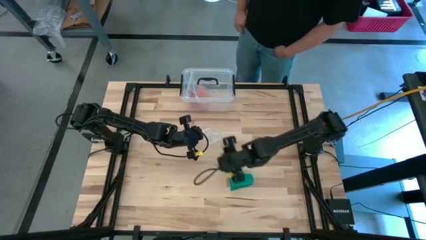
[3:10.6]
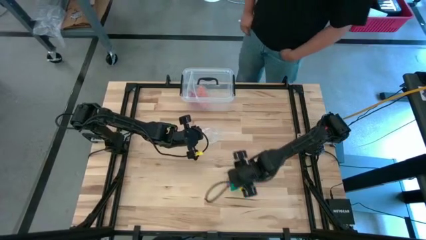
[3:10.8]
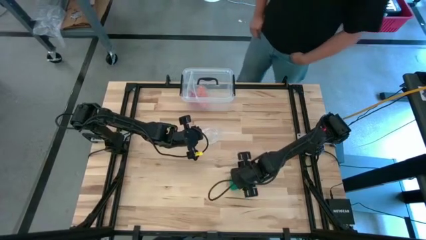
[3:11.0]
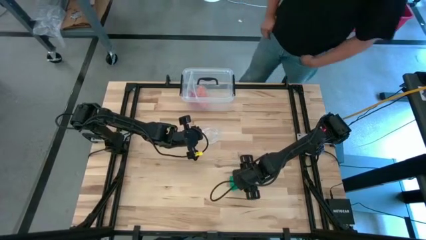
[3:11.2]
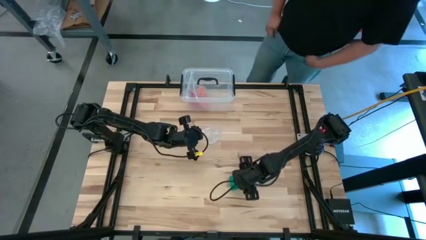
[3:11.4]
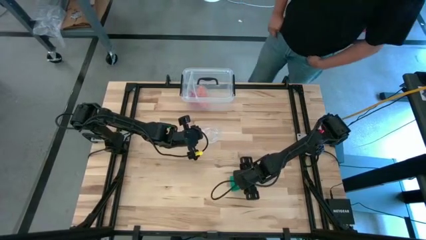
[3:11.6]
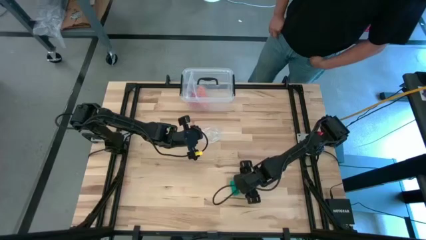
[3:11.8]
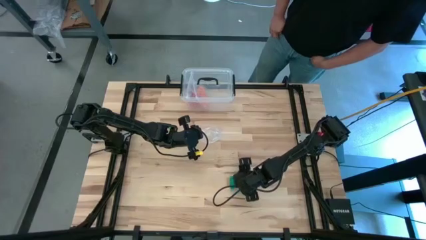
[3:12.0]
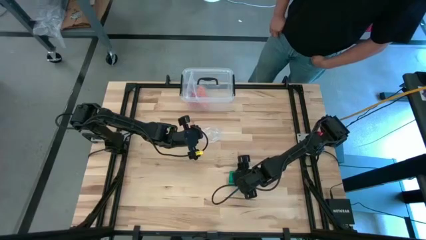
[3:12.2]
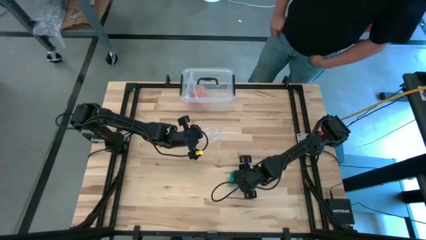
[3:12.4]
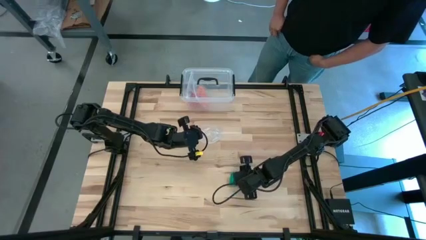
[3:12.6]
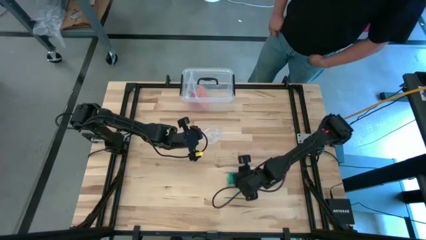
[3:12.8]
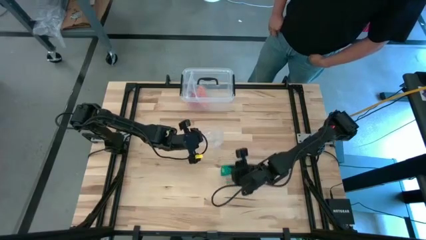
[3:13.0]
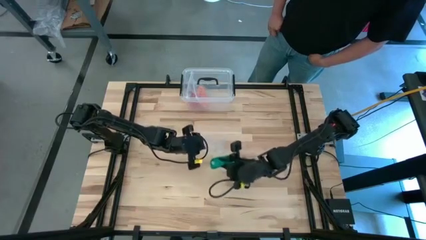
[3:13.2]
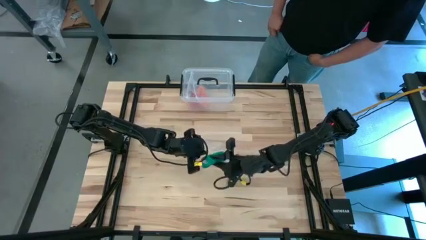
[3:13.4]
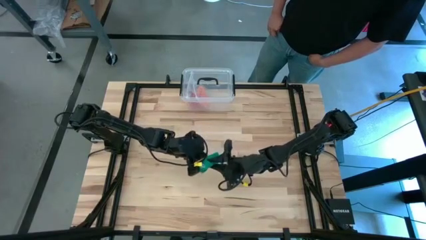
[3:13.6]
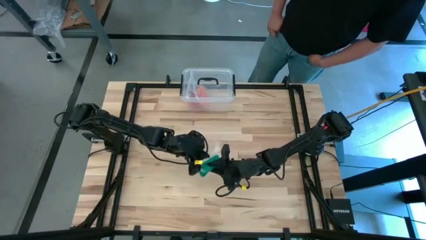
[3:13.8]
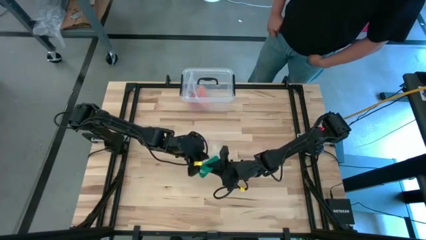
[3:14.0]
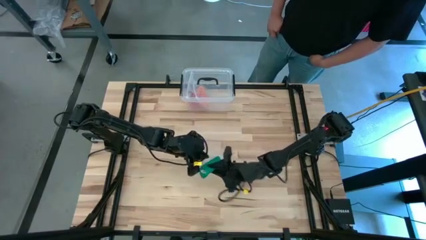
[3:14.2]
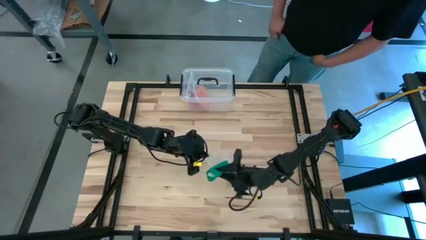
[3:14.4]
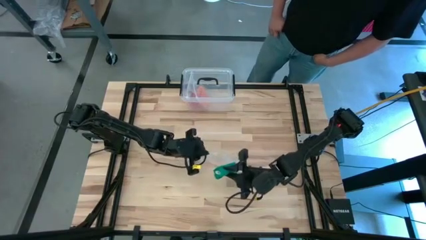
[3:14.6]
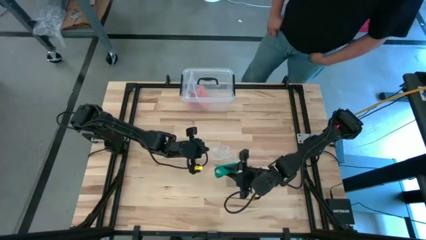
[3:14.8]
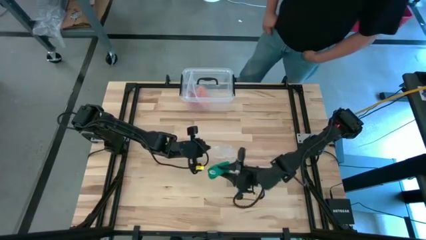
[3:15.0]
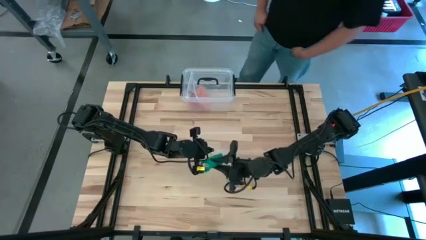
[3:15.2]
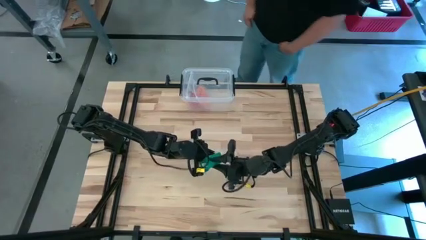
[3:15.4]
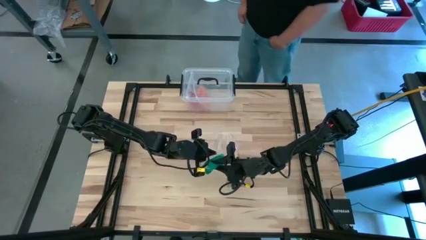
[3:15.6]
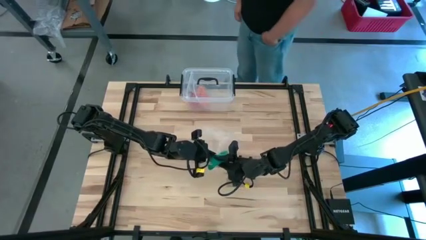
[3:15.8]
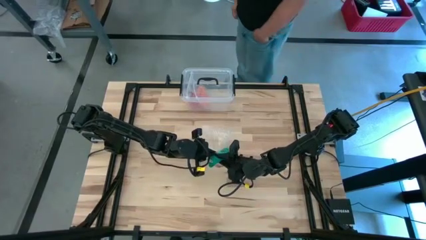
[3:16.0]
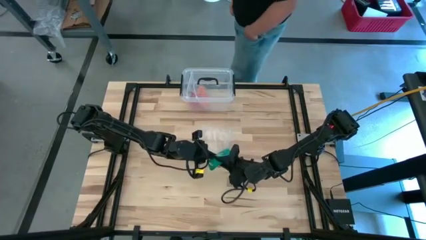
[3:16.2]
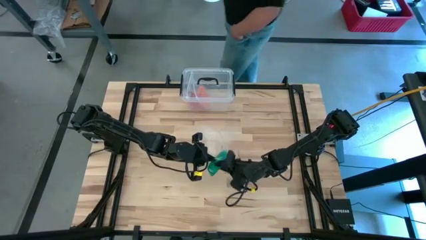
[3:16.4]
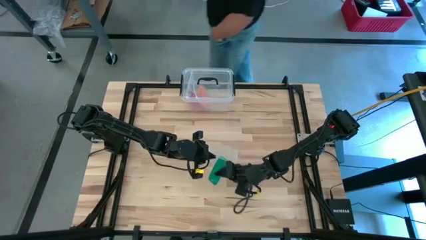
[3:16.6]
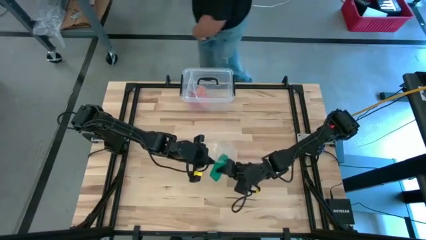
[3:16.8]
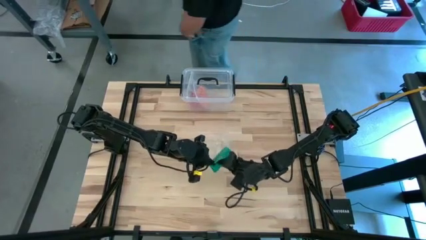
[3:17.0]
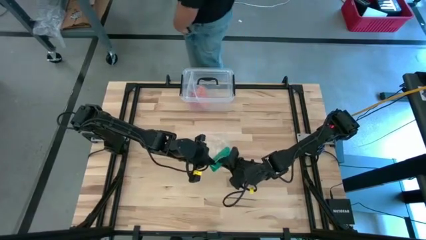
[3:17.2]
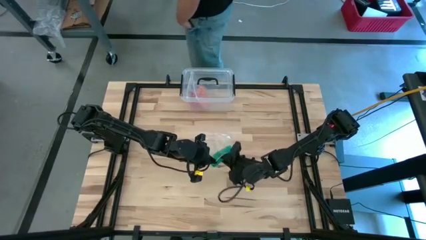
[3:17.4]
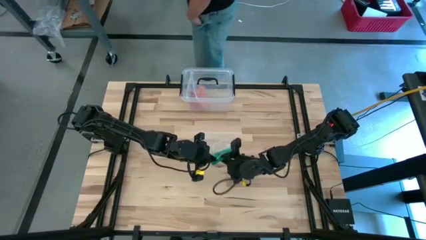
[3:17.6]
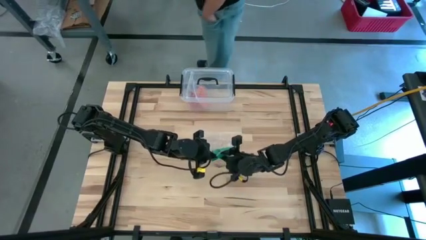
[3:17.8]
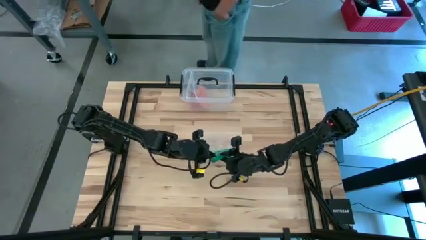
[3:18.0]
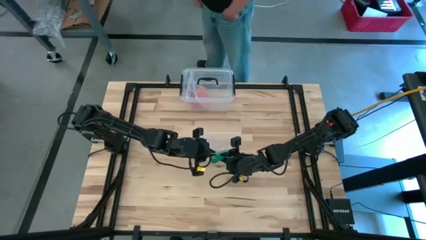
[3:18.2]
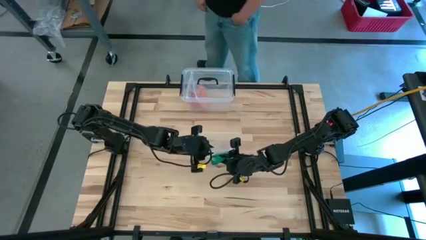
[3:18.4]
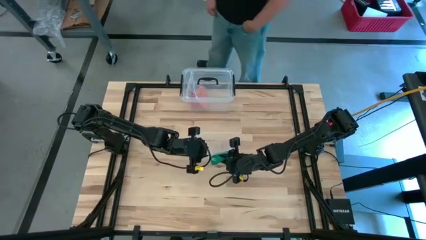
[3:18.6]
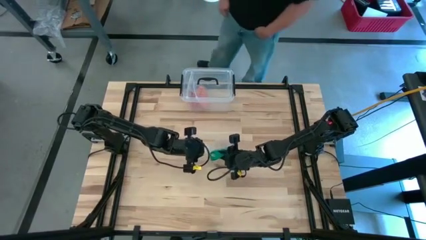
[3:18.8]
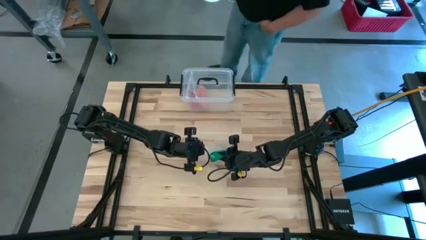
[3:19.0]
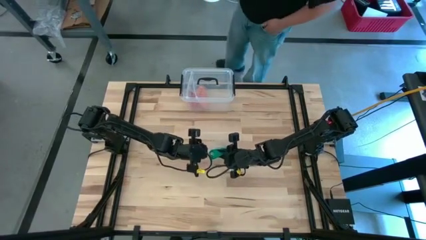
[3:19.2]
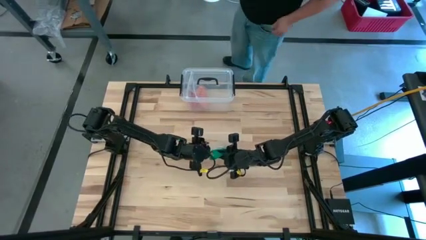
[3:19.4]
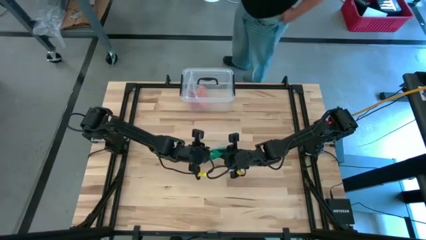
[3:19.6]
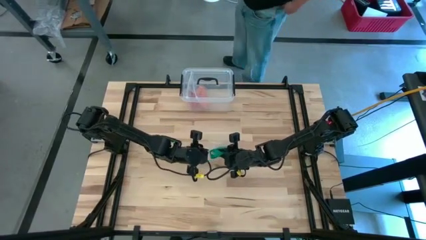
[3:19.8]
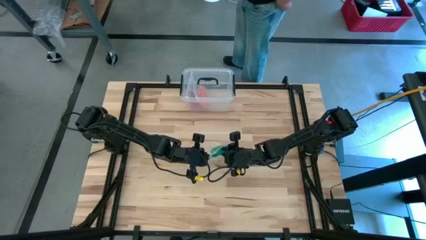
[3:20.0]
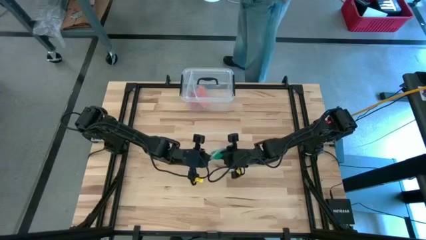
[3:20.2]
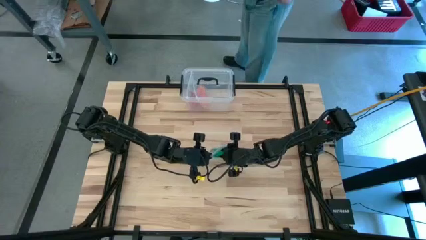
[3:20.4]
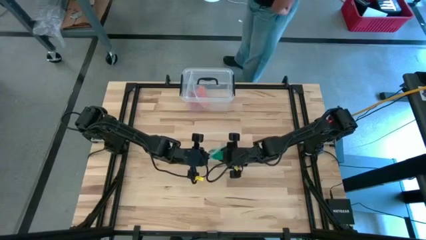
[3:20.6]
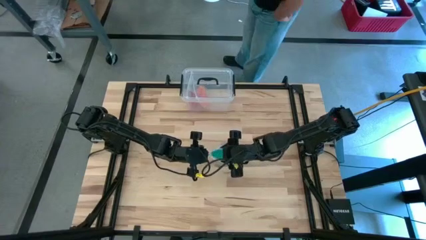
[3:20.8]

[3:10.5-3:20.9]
Task: Roll bandage
Put the rolled green bandage into the transparent zip bag

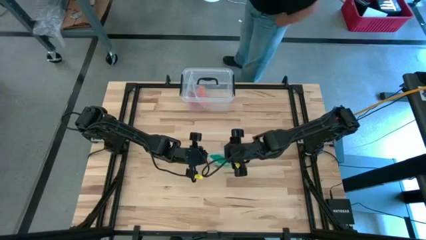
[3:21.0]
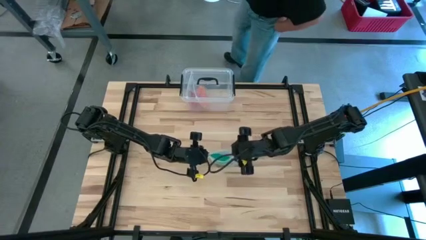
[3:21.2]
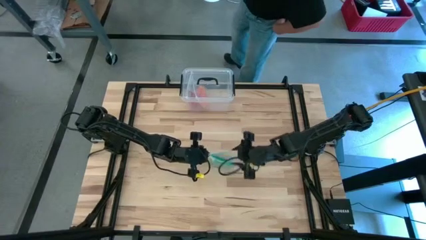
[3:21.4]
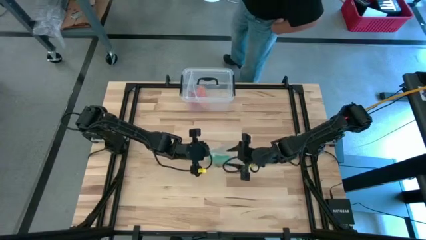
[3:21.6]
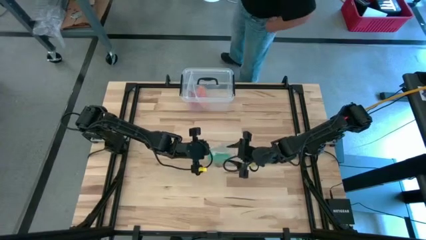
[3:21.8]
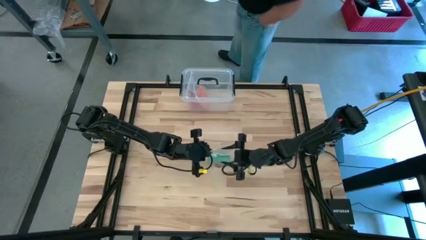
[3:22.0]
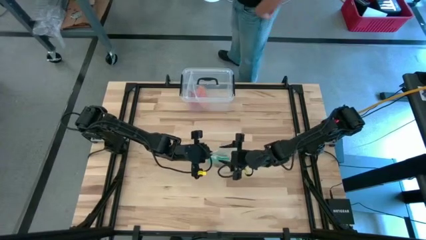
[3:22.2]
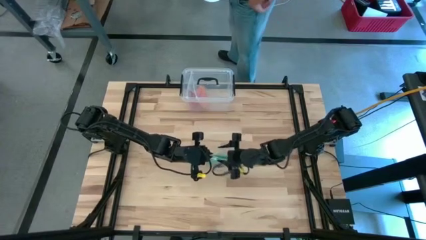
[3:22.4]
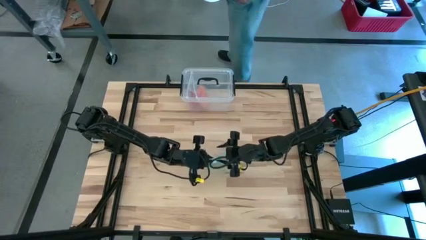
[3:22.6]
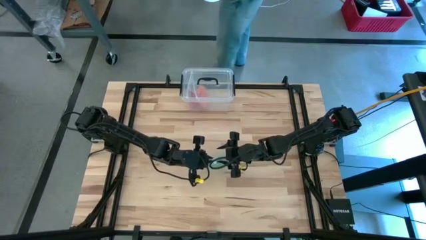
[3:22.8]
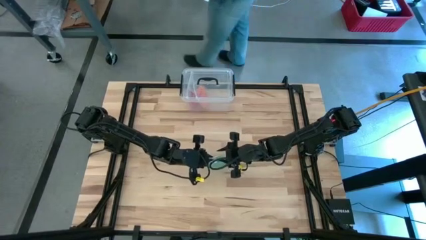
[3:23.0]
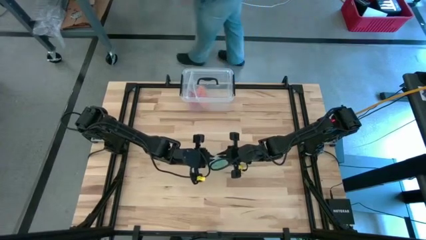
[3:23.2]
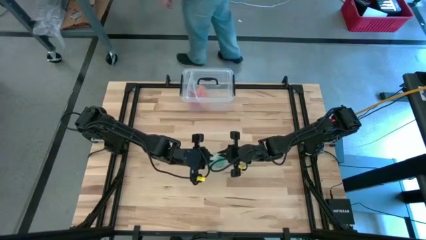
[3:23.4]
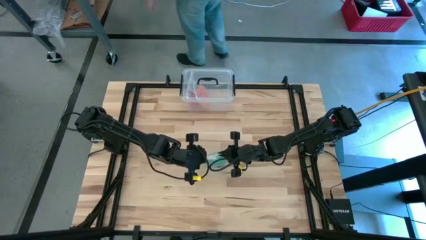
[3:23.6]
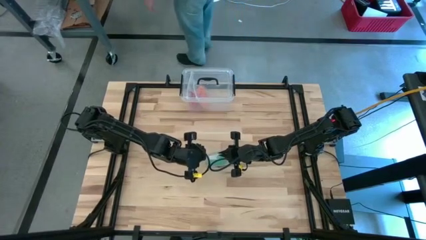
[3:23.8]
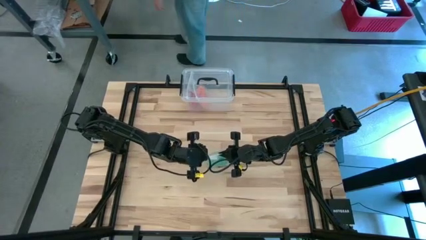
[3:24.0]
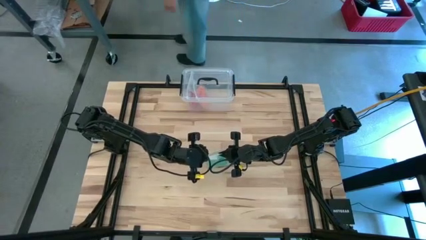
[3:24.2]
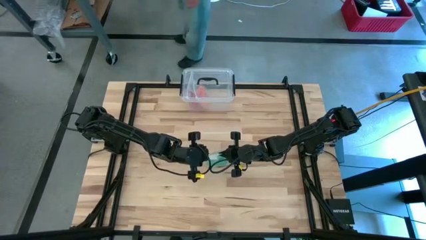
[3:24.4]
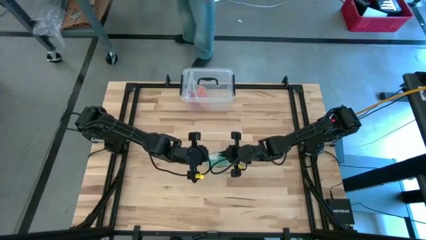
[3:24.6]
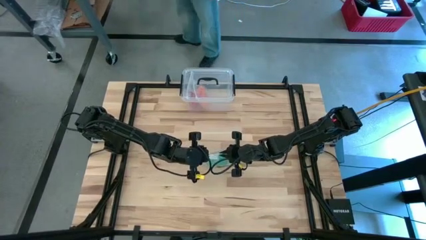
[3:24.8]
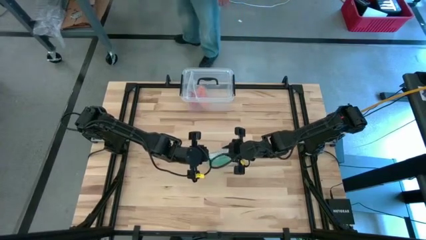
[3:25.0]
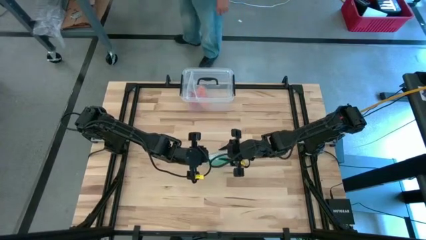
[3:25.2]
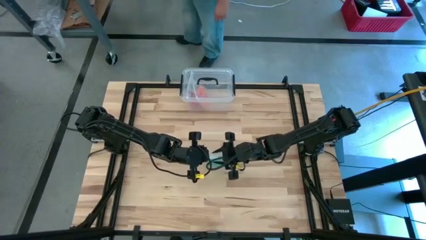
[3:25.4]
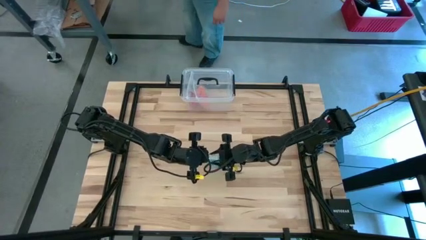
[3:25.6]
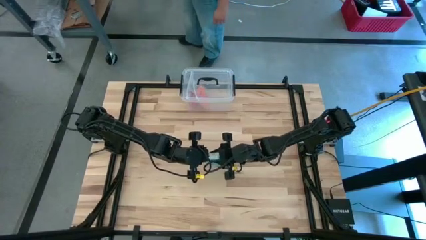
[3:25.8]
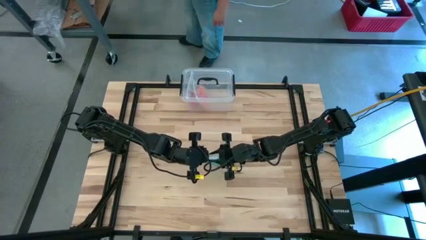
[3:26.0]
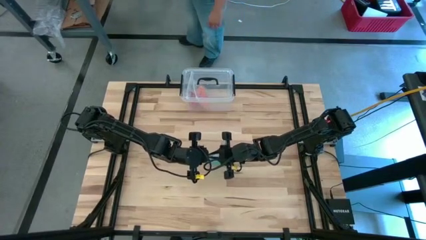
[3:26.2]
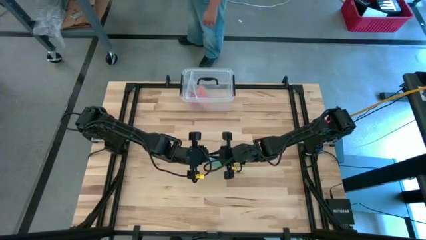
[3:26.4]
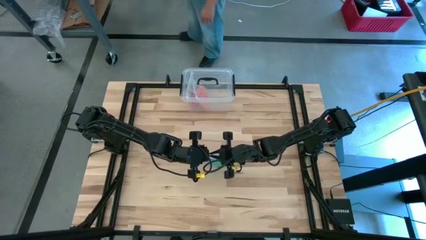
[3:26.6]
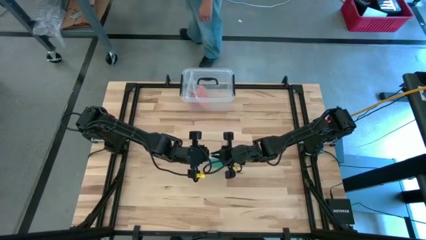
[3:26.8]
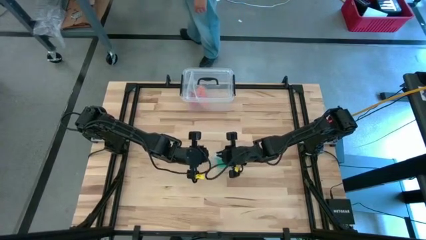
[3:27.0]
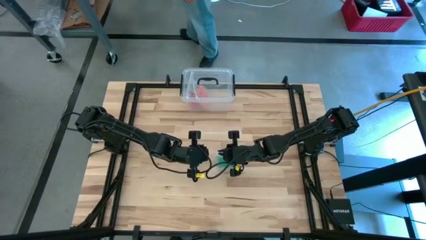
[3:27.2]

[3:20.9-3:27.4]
Close the transparent zip bag

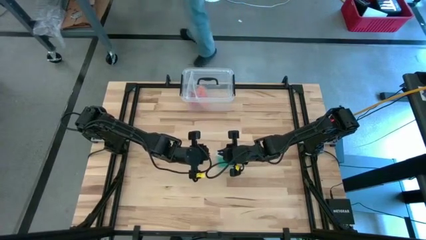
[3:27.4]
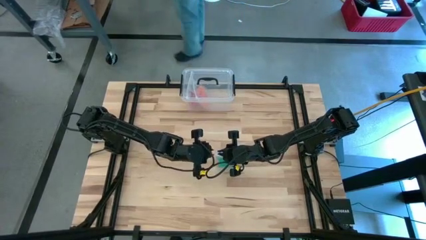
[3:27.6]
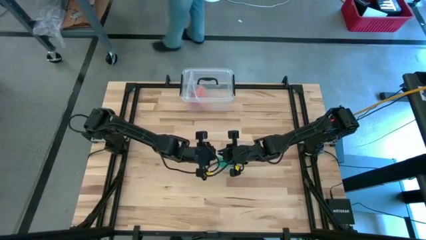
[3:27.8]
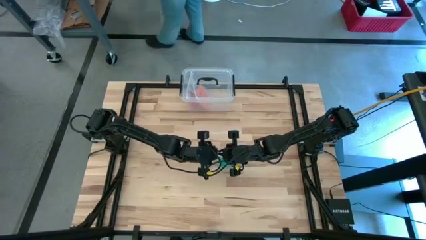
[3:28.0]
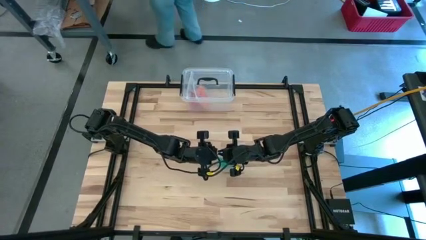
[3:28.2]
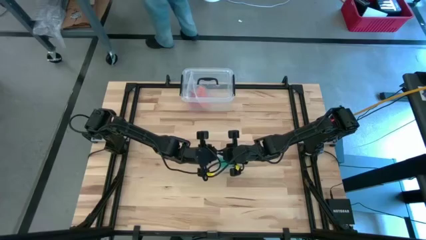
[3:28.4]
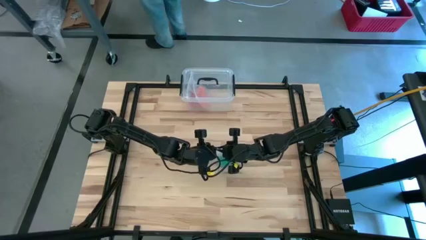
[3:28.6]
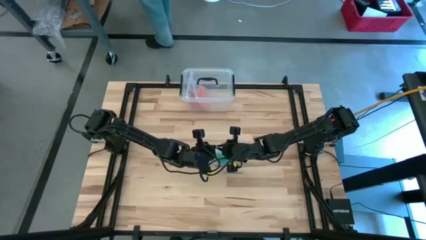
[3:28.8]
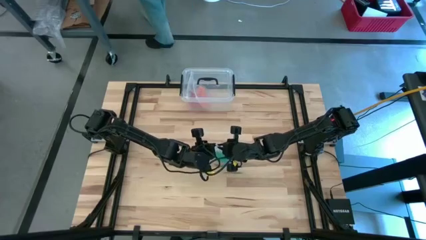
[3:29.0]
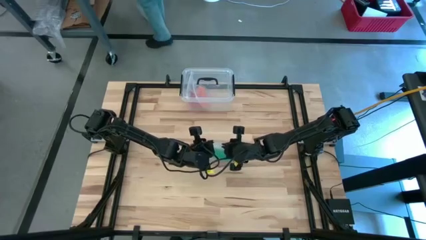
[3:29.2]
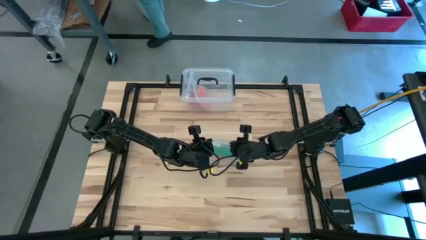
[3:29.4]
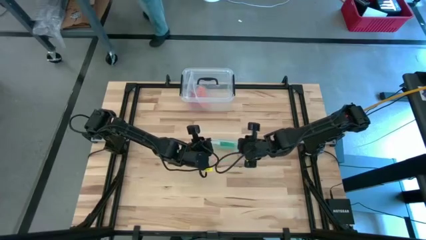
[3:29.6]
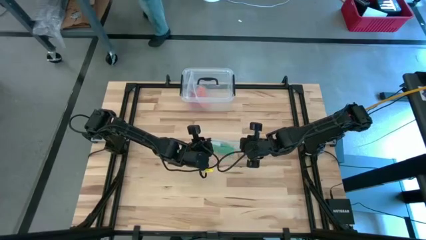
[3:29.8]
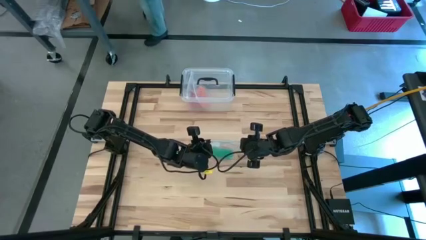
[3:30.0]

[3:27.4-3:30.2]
Close the transparent zip bag
